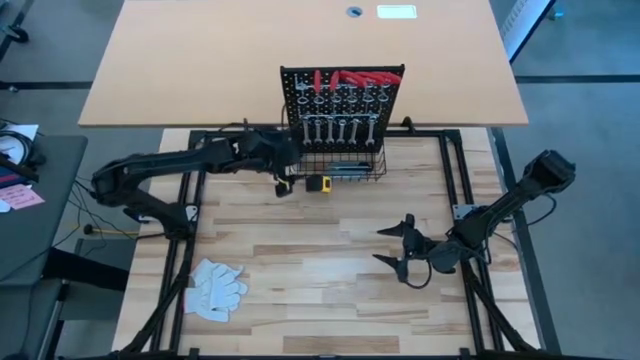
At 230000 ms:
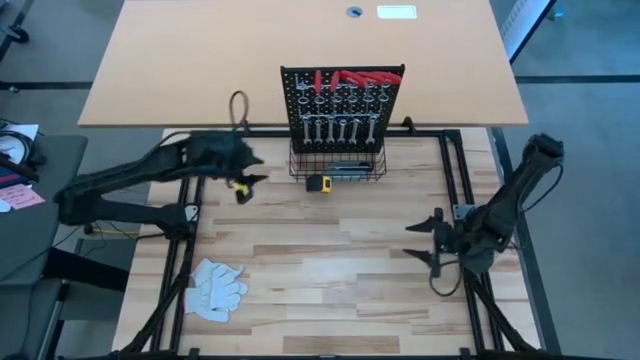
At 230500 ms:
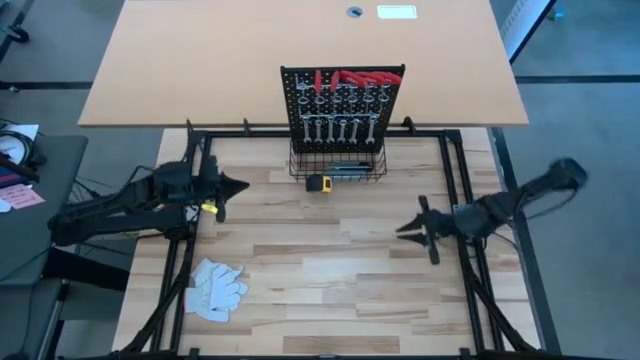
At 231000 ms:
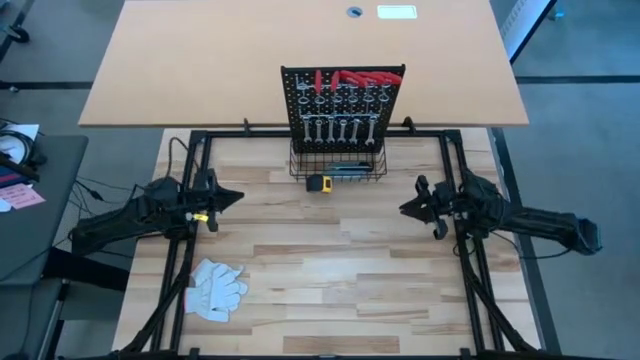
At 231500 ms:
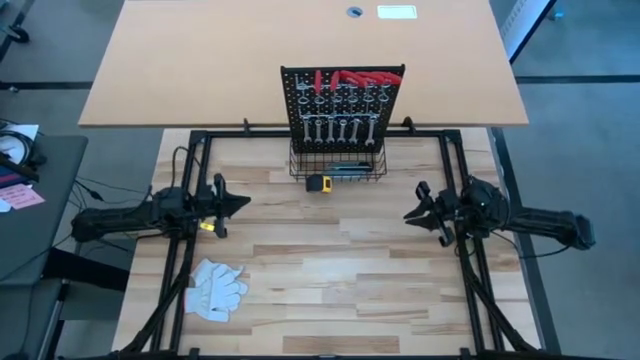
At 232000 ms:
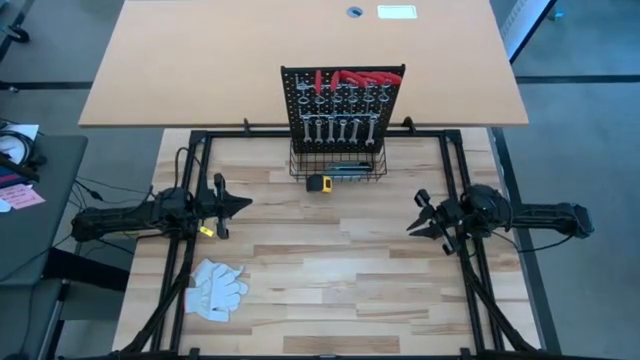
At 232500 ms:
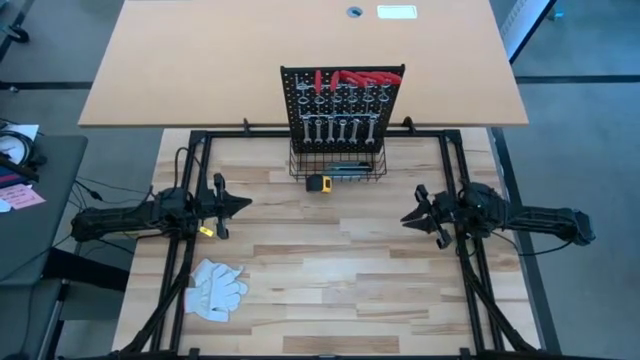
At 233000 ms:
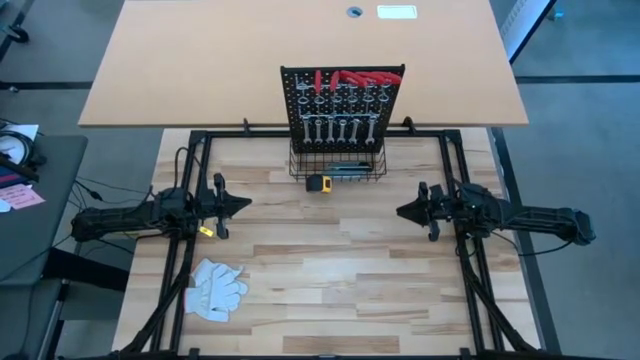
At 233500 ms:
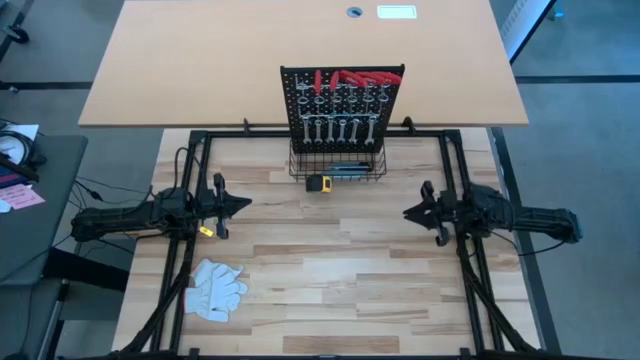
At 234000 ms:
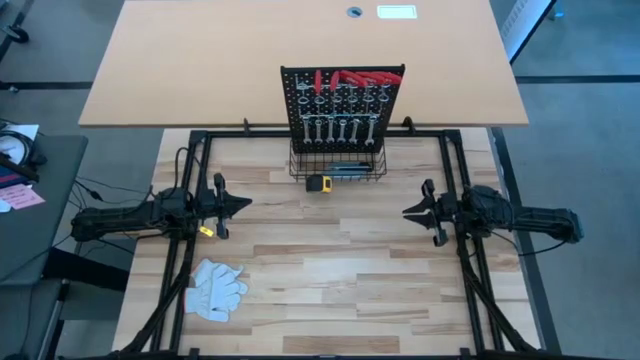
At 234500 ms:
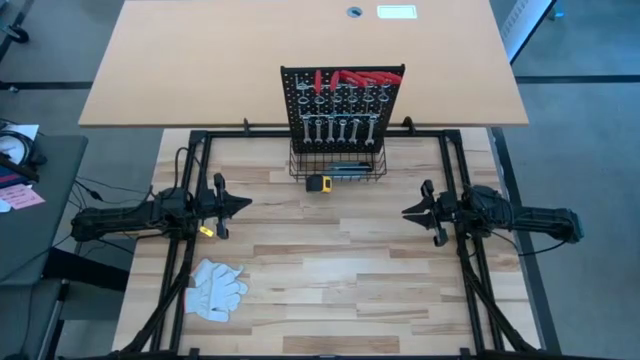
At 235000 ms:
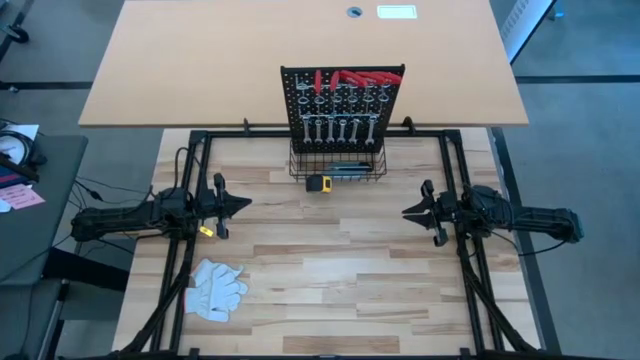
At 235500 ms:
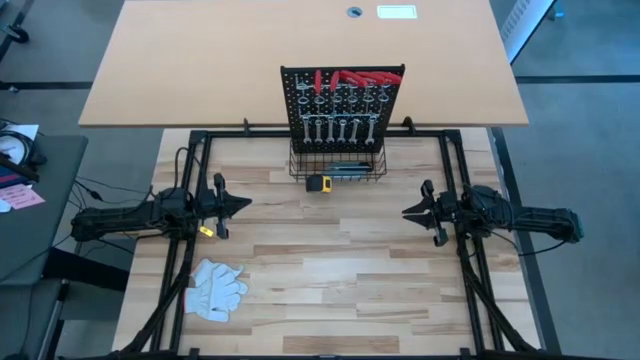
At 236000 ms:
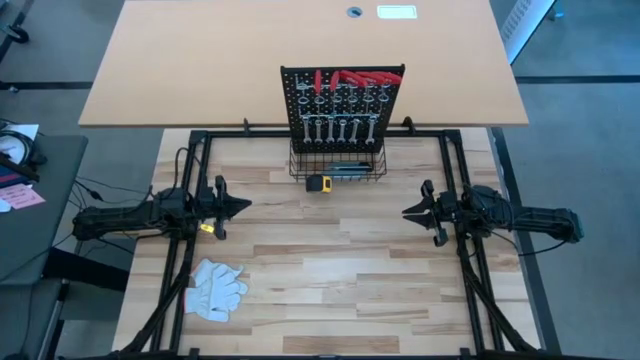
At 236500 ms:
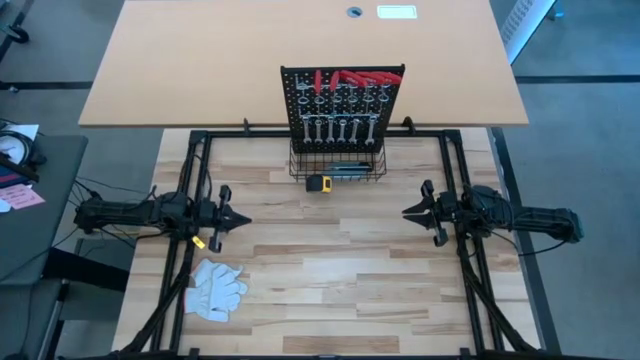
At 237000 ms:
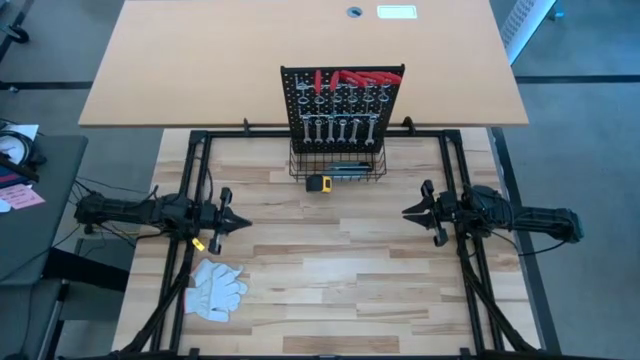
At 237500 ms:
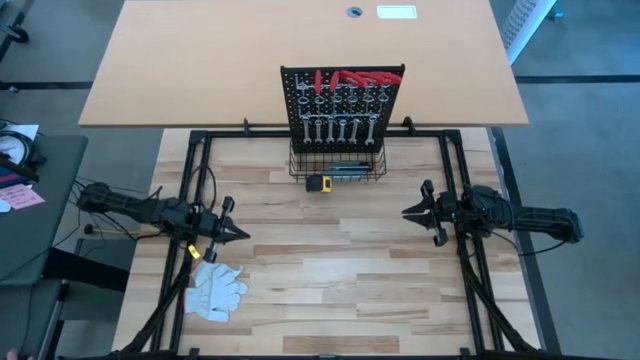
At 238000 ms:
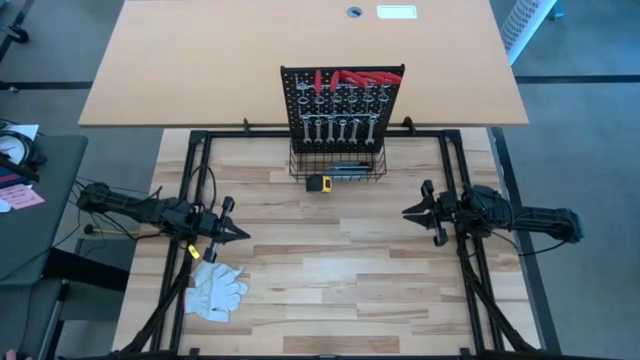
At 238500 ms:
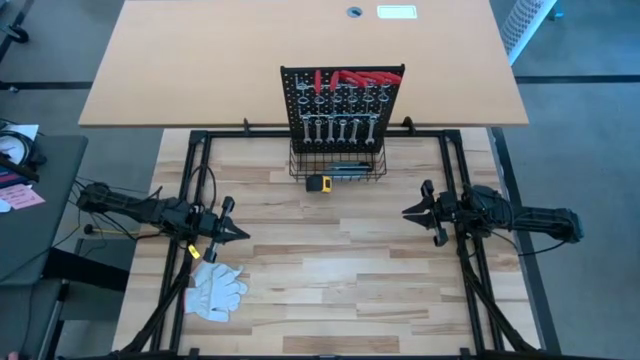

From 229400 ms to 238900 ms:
Task: Hang tools onto peg board
Return to Home Position

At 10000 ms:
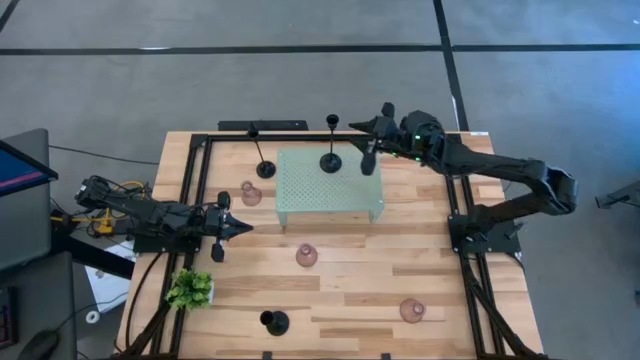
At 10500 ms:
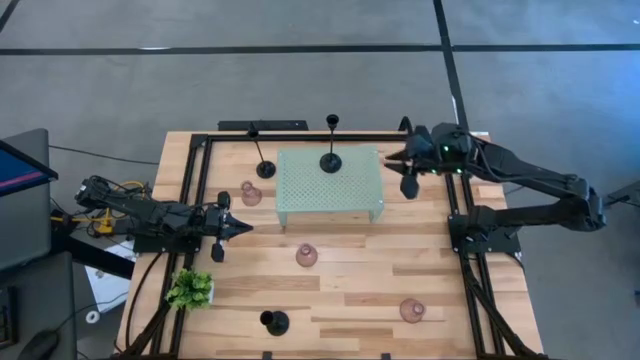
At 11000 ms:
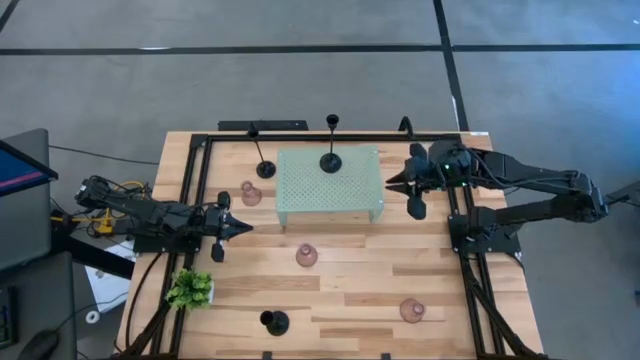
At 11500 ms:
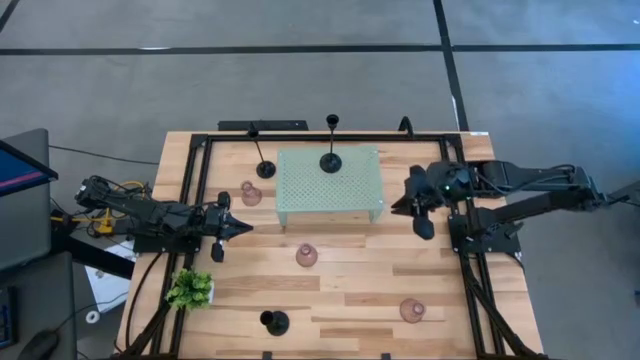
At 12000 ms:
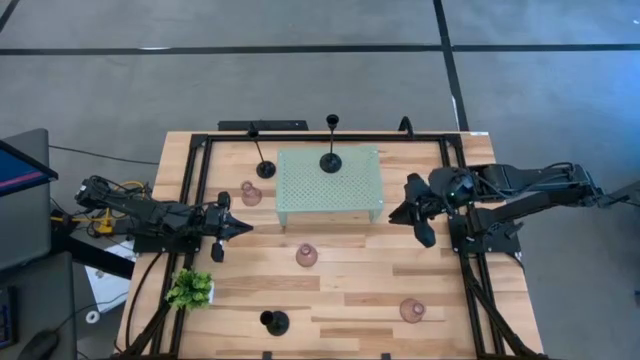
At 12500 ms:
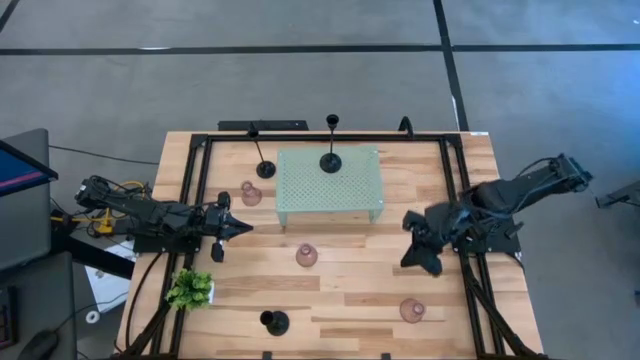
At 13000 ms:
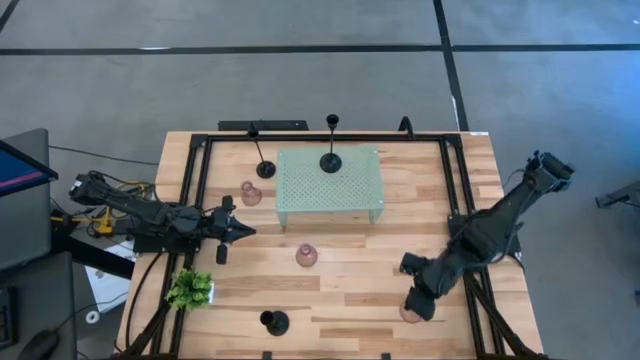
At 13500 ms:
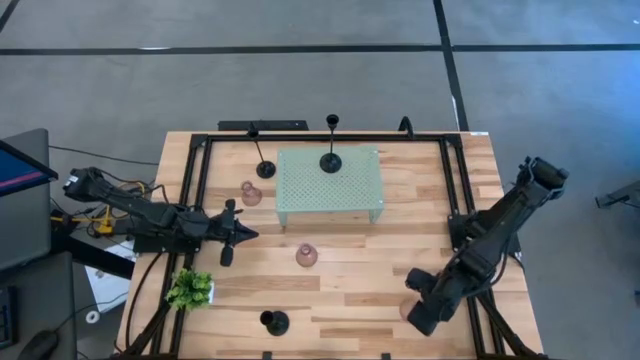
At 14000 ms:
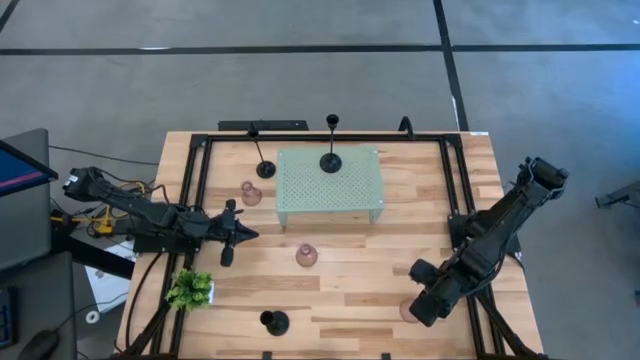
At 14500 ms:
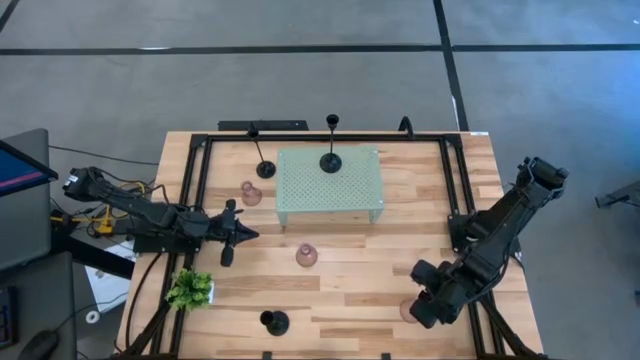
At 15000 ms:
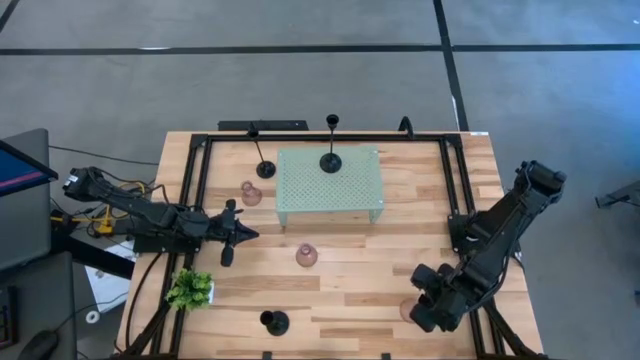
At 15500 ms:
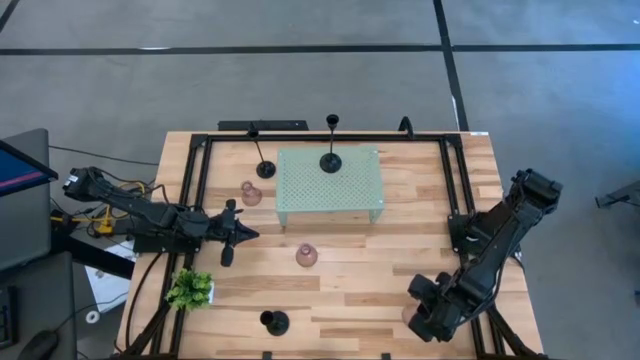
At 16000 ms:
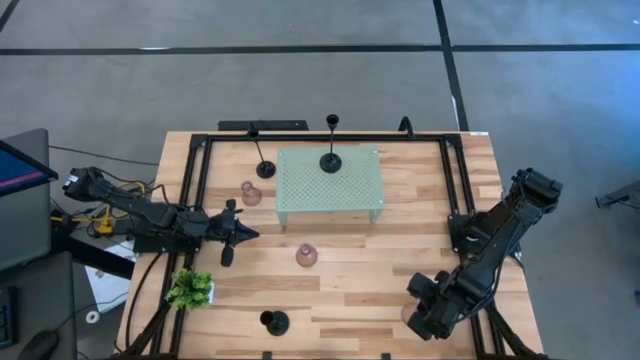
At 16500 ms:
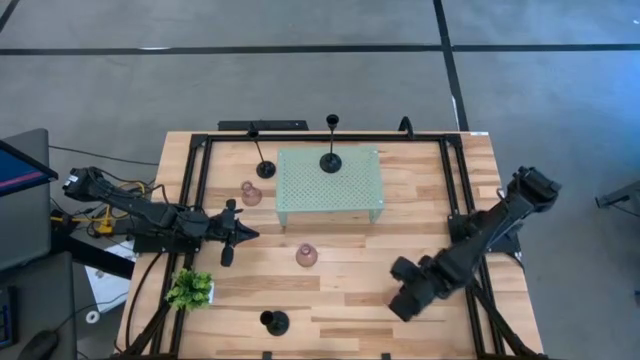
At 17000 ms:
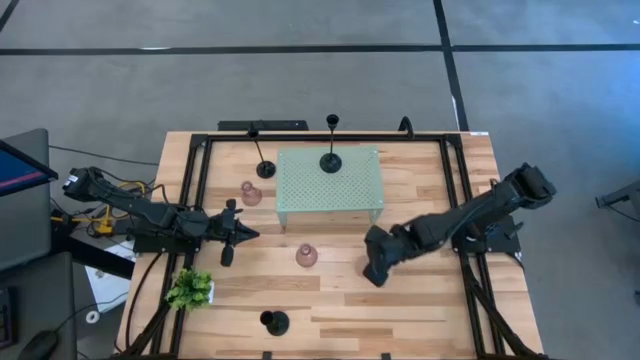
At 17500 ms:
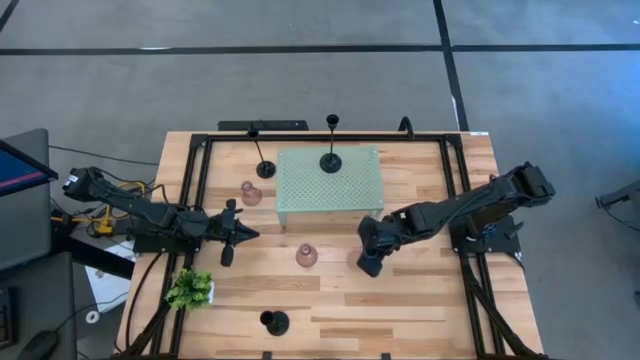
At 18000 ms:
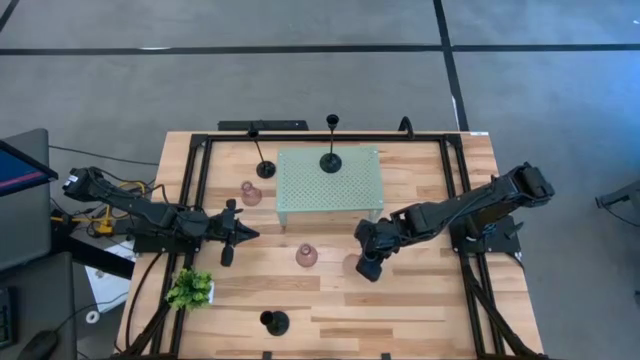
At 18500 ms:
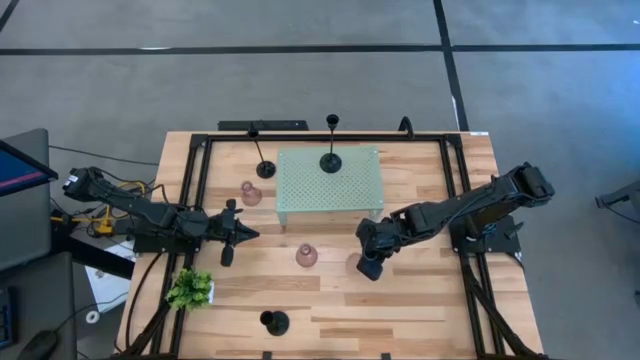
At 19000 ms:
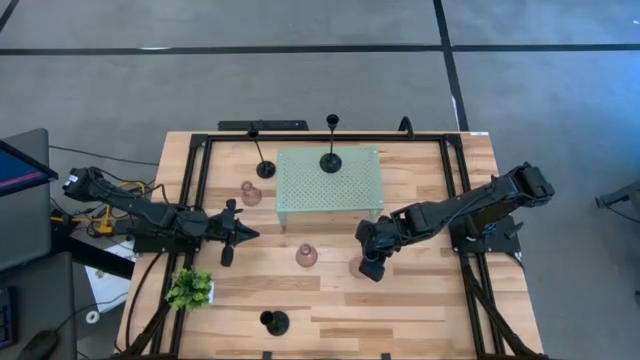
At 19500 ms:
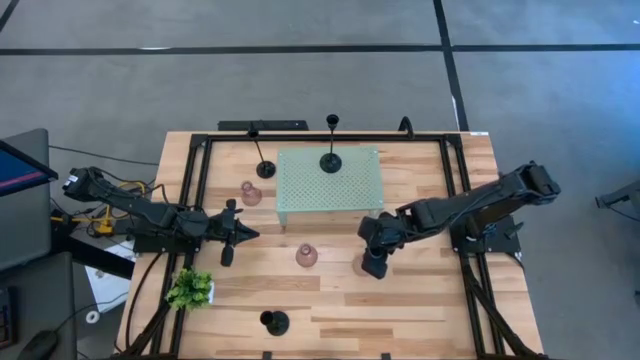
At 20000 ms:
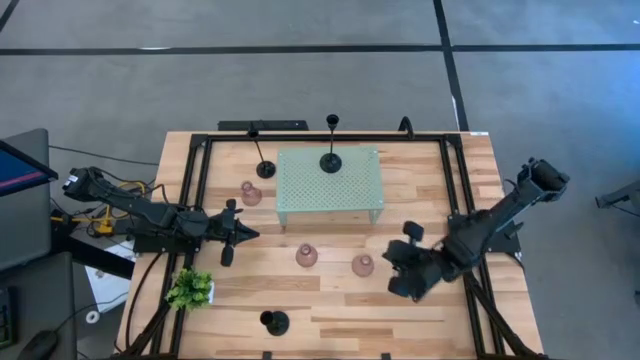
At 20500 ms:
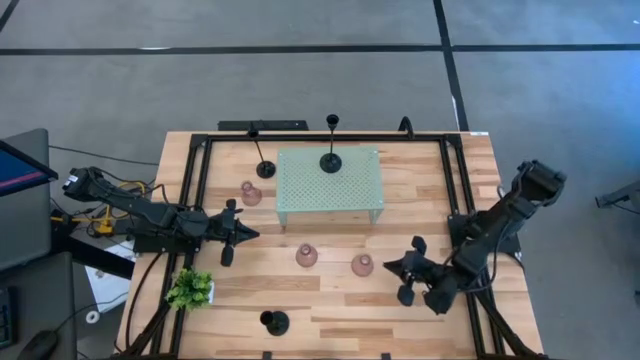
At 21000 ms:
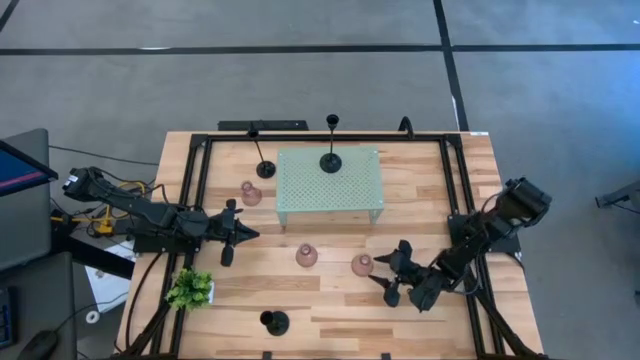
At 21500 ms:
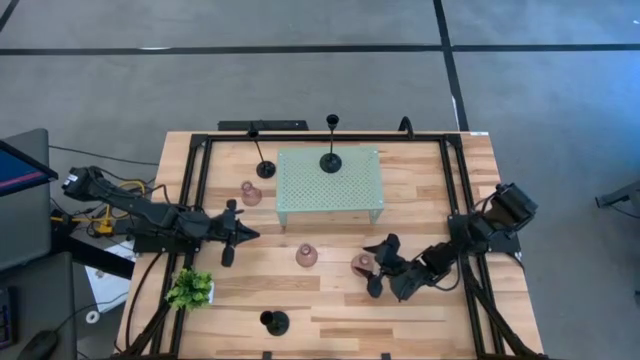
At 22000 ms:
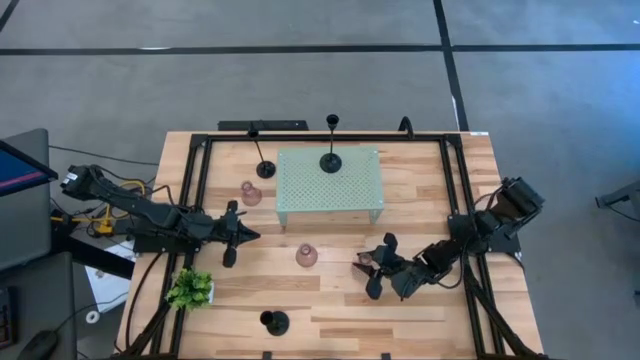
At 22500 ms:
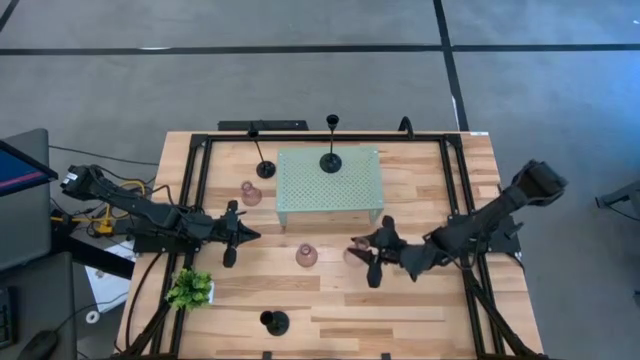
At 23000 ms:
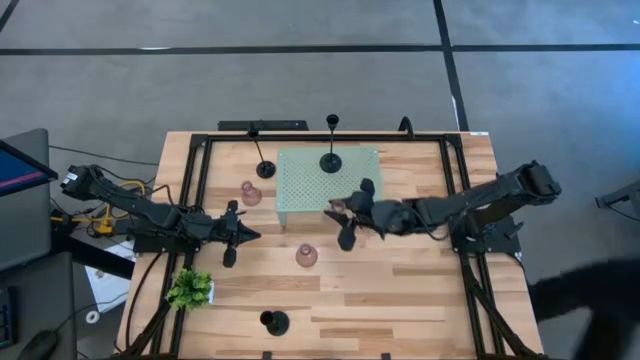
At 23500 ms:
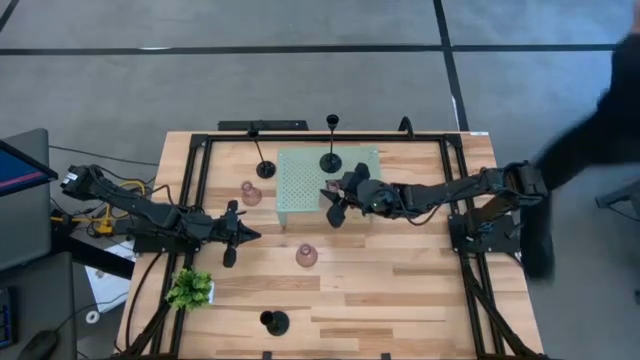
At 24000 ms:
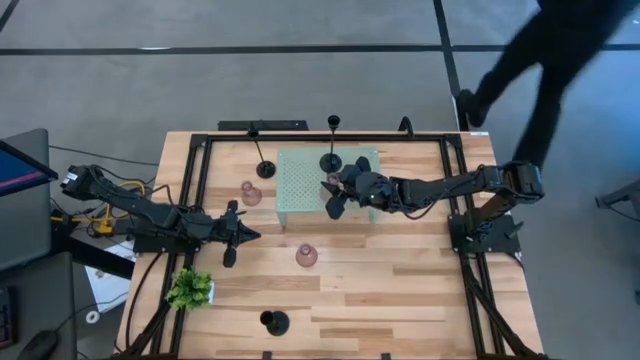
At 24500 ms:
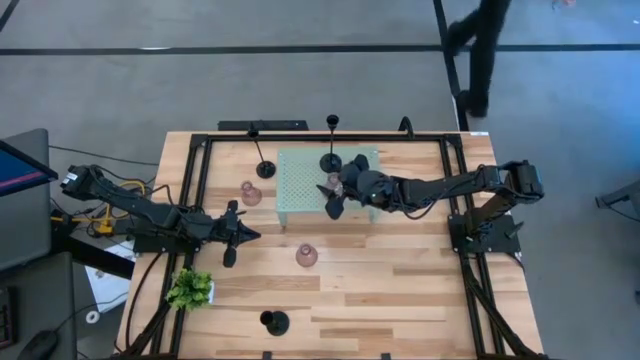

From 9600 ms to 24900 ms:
Task: Pick & Place candle stick holders
Put the bottom pink glass candle holder on the shelf
